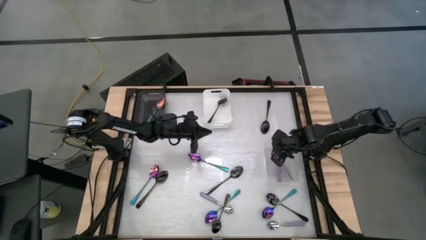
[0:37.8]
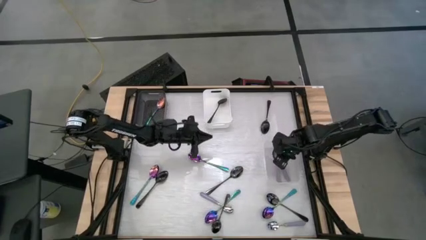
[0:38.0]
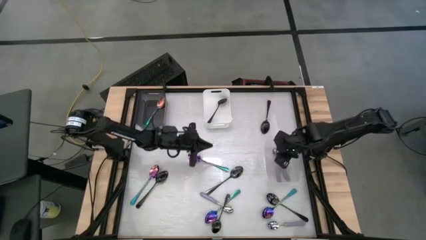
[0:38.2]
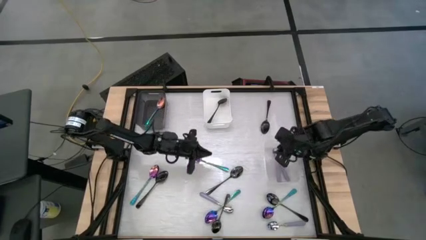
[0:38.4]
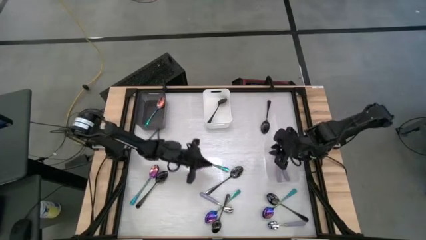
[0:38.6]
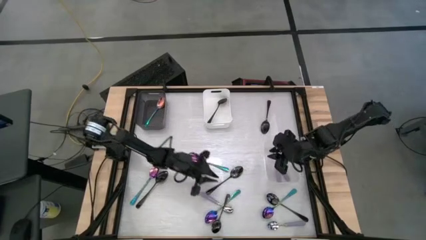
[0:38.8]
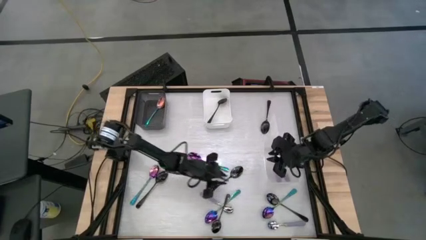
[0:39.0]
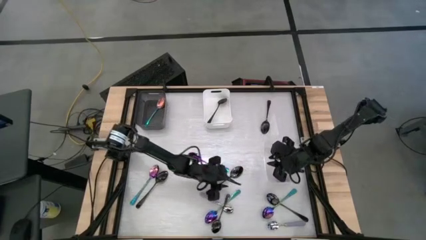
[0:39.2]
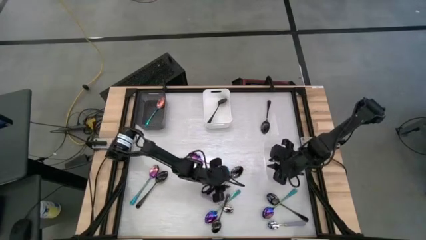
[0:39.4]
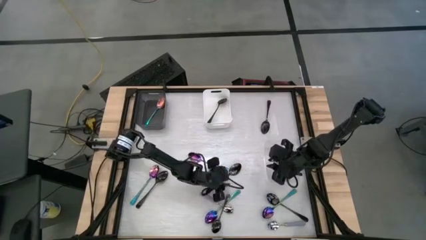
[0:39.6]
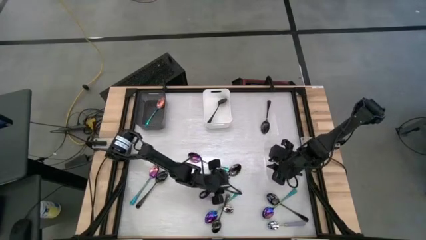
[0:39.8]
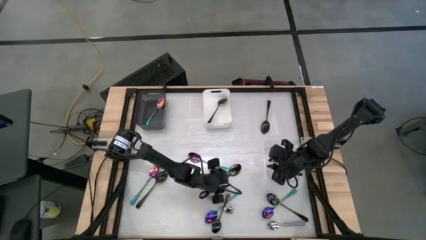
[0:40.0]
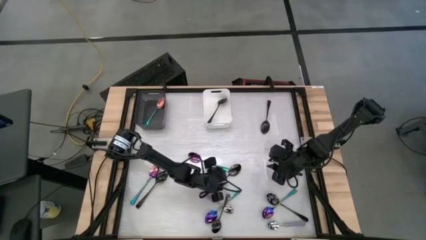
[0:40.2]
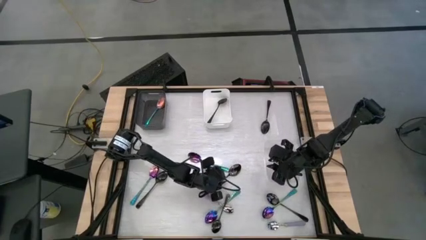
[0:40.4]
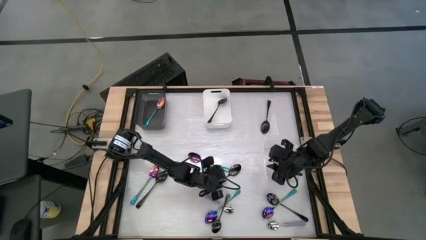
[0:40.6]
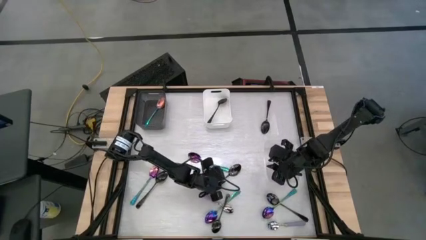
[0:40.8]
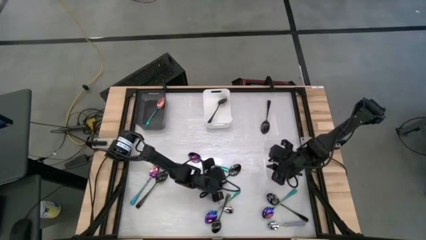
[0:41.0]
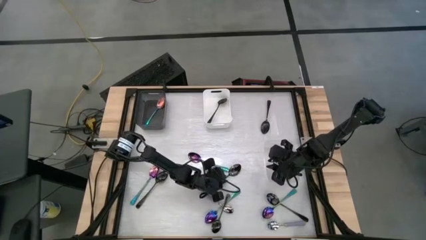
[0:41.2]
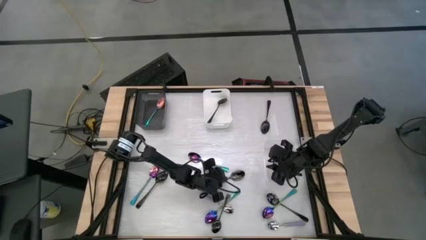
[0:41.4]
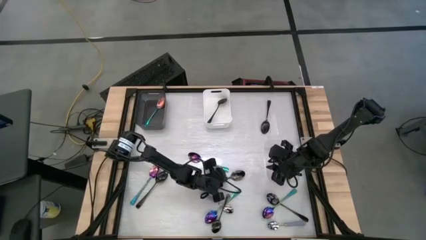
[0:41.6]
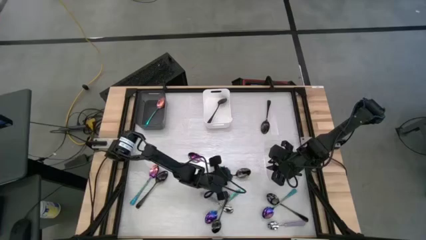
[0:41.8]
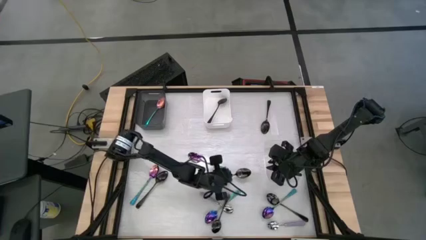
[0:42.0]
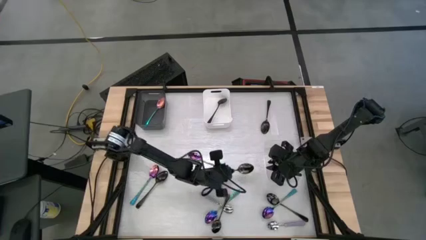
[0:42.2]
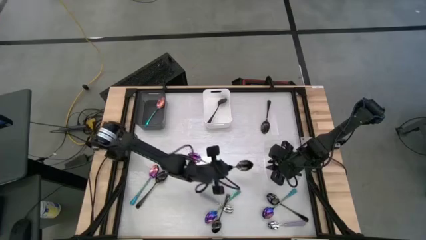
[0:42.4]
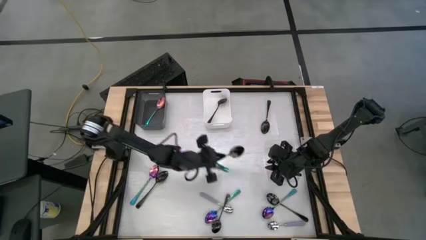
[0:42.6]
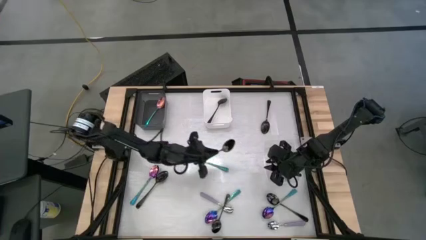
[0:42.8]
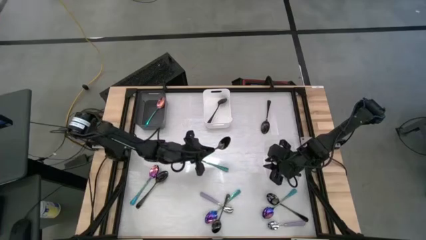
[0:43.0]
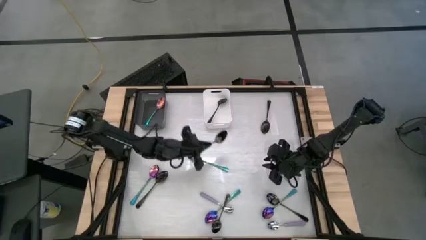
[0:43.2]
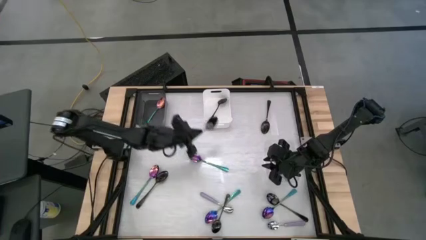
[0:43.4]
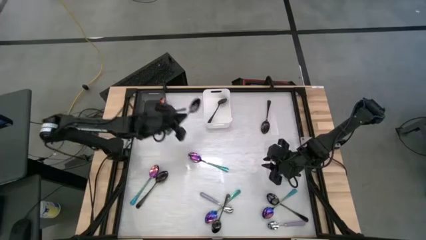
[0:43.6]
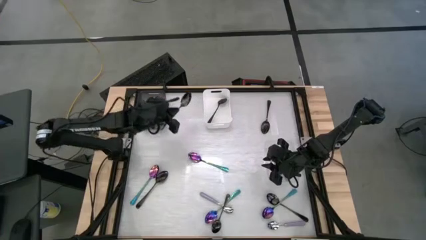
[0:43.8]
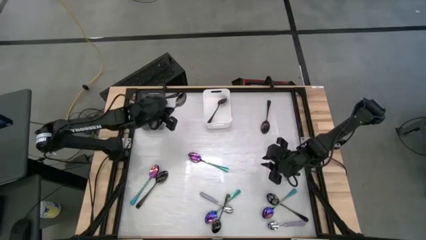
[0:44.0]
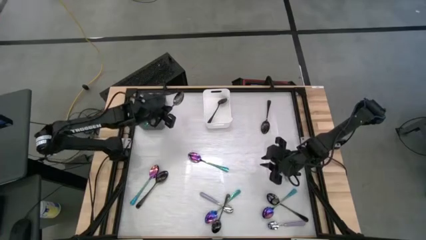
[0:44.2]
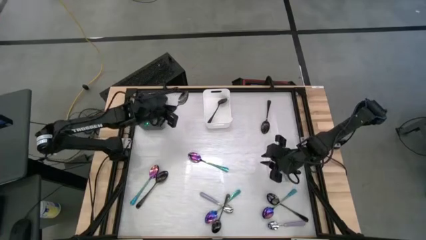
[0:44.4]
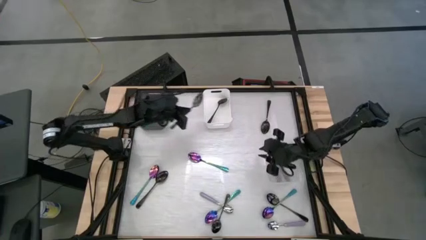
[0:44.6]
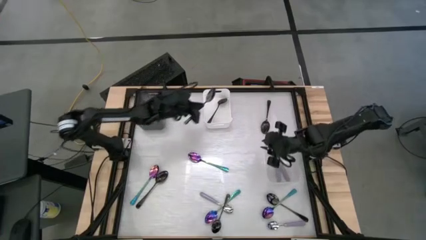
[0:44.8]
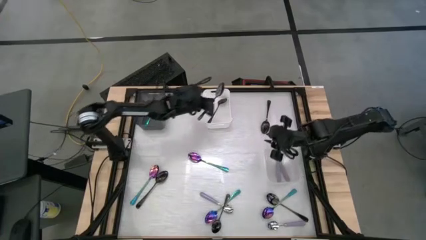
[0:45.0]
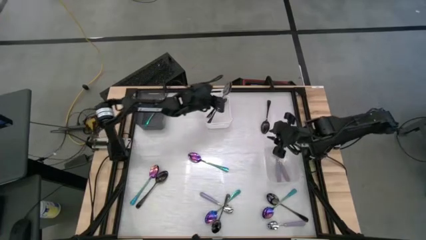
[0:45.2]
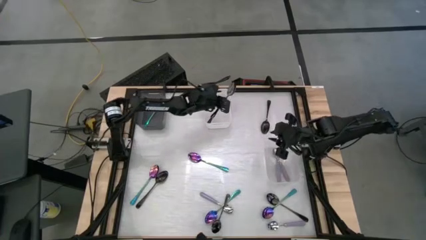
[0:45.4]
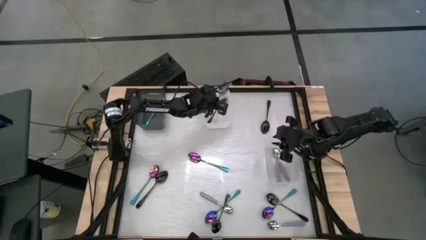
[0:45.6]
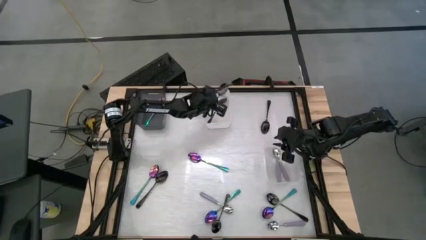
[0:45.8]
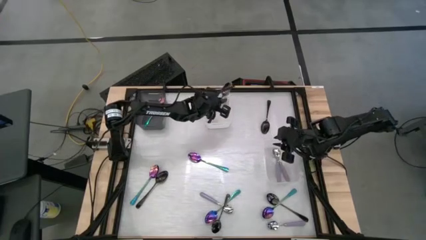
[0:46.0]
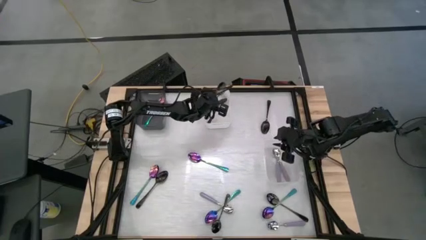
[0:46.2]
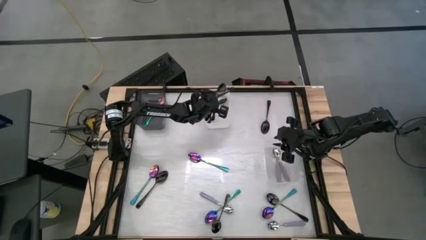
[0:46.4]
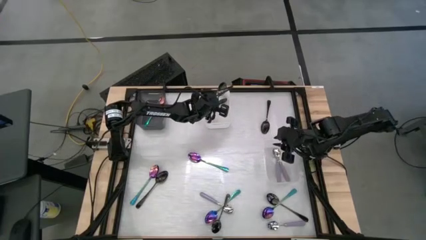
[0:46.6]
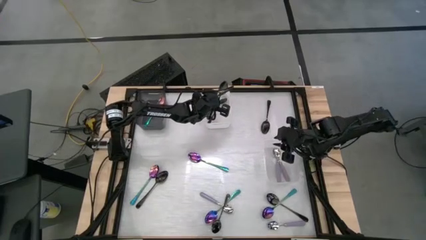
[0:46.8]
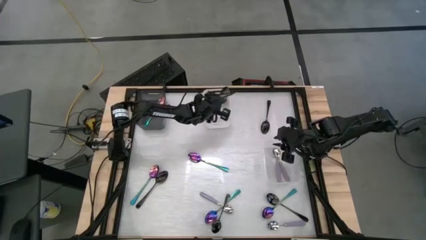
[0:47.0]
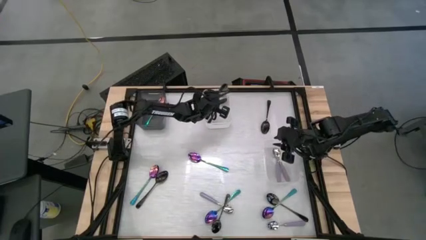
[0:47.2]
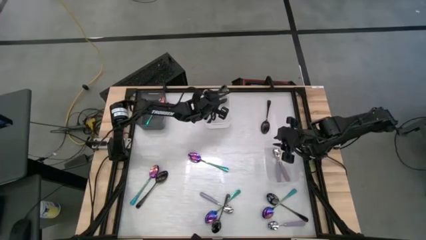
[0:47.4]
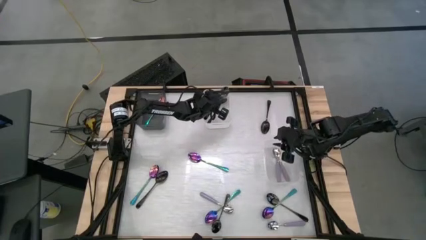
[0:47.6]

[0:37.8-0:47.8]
Task: Sort silverware by color (type)
Put the black spoon into the white bin

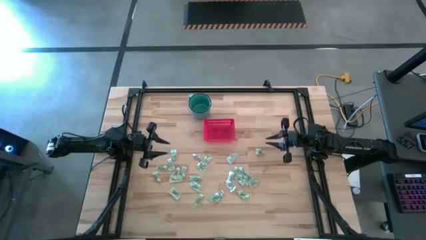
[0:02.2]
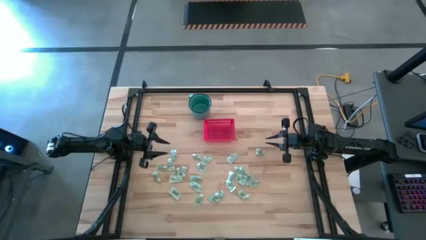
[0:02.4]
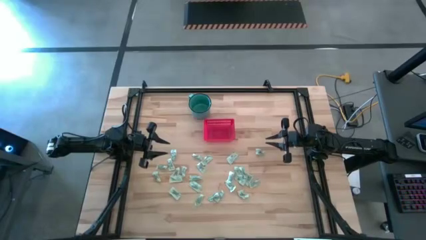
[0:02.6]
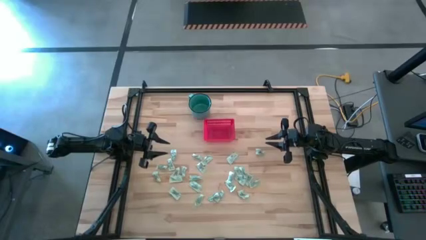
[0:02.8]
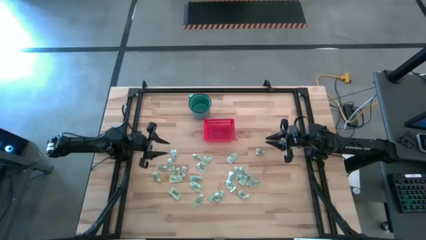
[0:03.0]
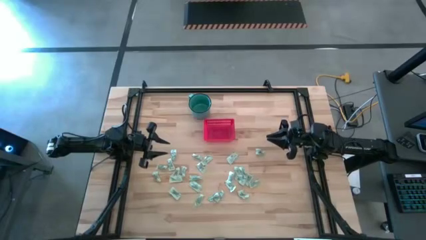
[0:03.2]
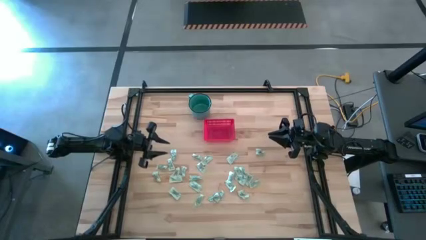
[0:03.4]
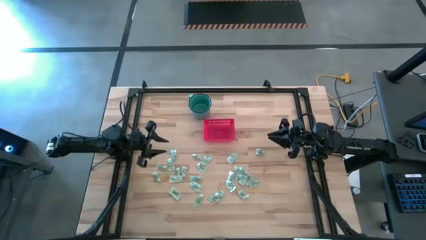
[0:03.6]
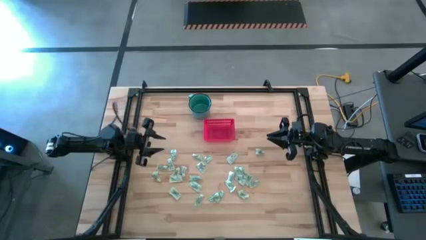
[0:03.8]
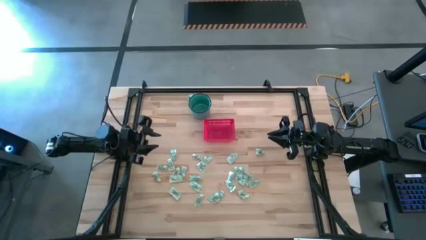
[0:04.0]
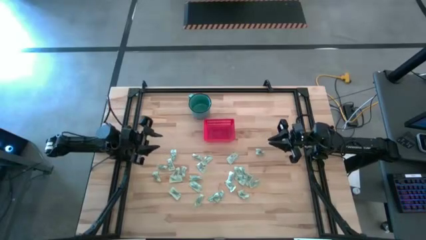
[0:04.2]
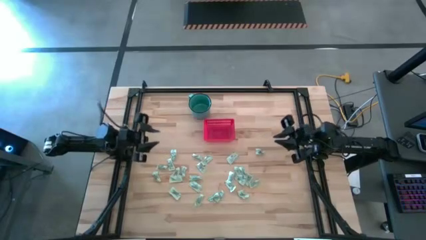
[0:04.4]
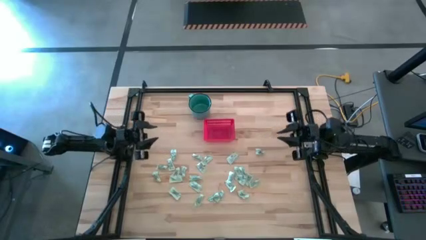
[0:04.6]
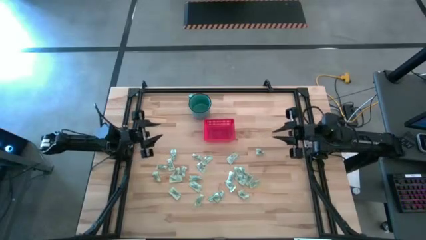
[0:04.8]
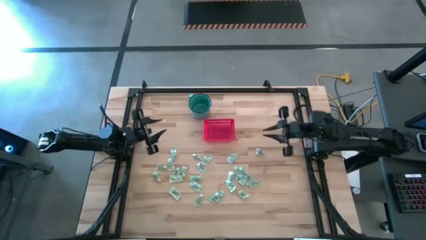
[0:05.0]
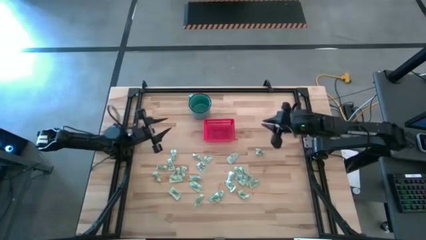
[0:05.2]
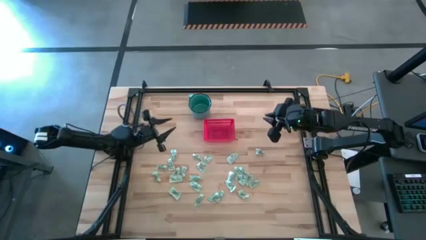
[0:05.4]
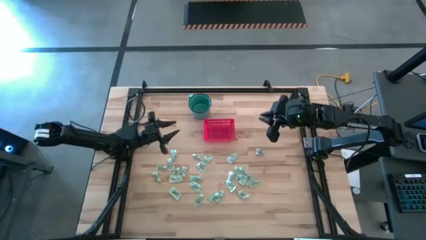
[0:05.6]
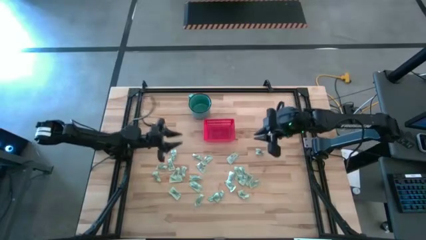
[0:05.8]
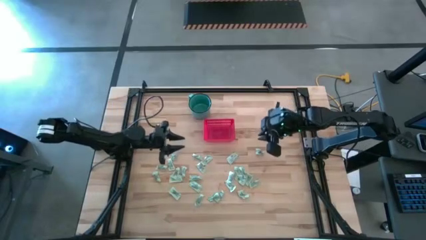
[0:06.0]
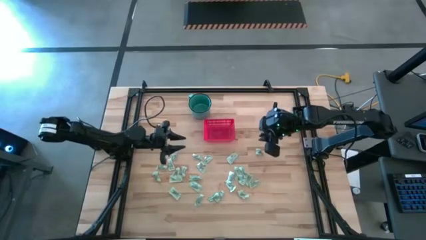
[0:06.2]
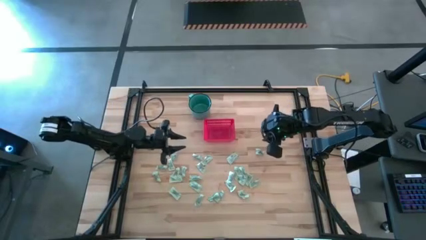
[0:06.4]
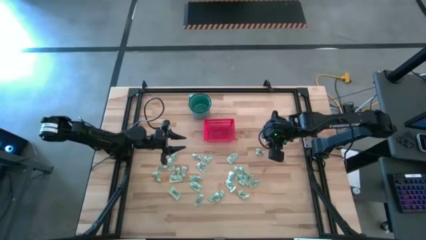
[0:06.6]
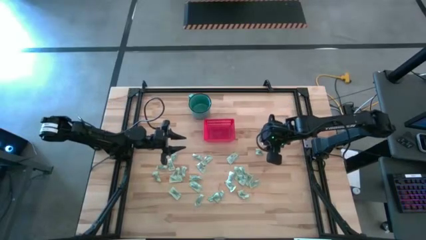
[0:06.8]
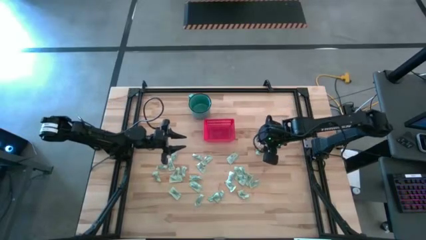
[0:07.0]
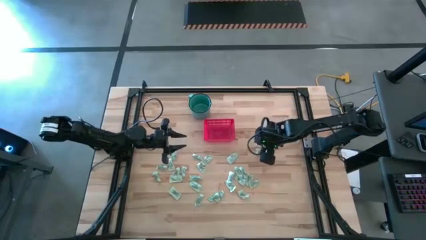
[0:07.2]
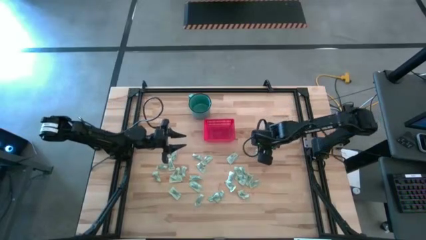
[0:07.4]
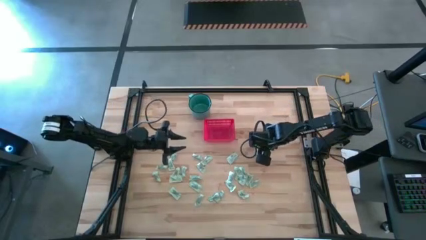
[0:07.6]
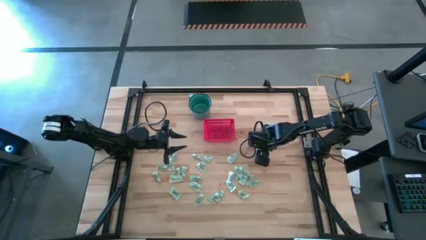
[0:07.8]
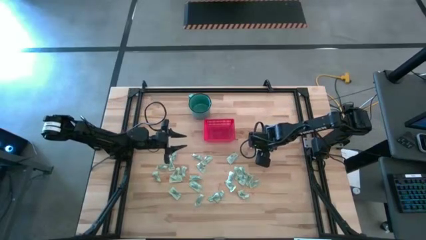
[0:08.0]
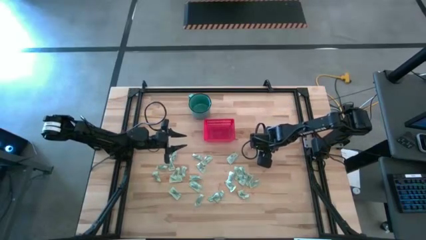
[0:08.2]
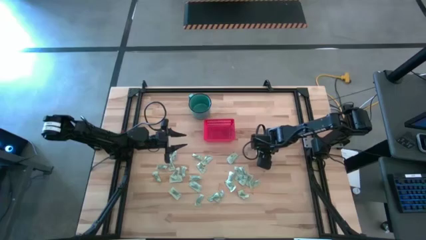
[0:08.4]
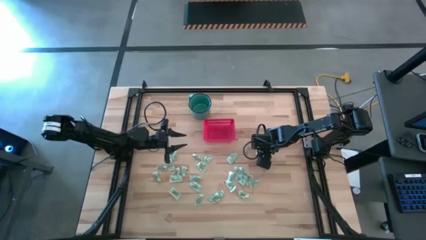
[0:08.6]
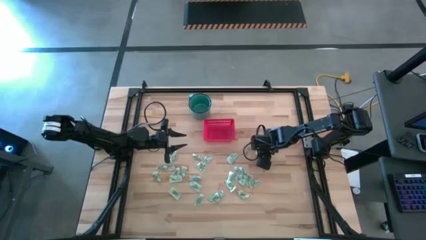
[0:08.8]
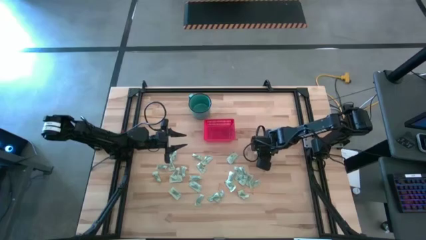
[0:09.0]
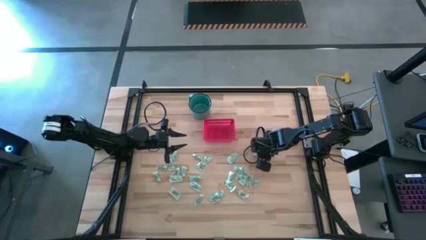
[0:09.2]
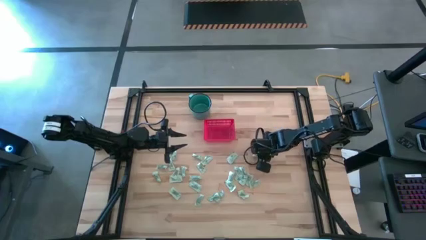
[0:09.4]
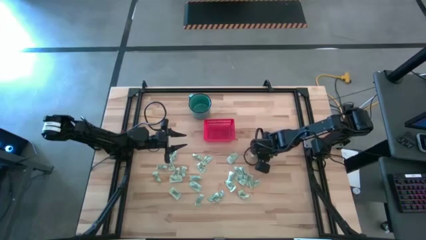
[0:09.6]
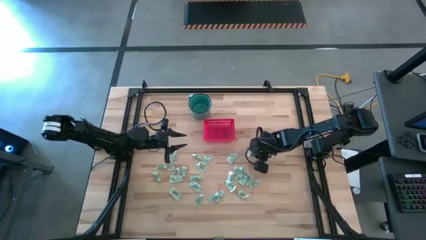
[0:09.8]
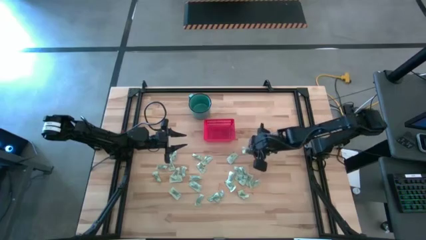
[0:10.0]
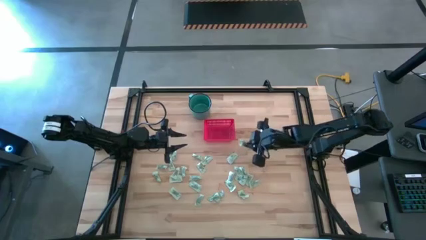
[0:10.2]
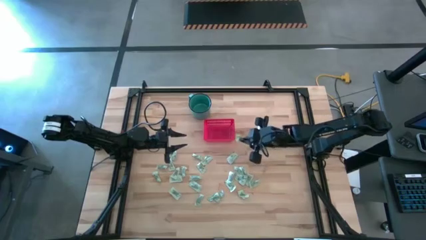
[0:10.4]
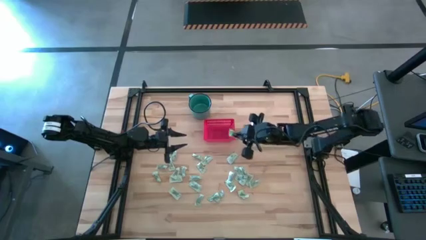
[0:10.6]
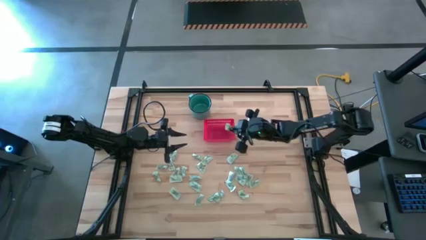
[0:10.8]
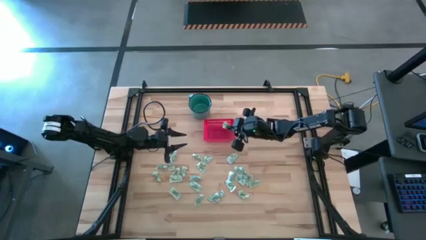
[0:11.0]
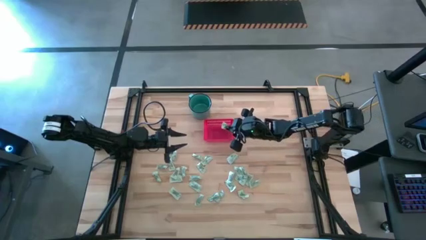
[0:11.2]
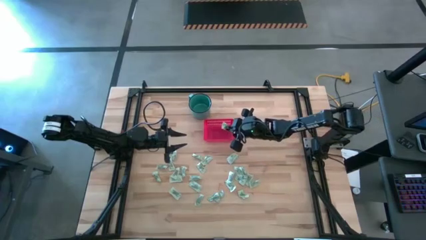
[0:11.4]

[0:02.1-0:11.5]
Task: Pick and place items into bin
Put the light green stevia packet into the red bin
